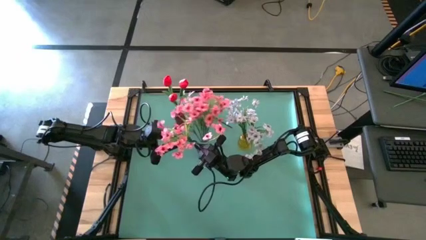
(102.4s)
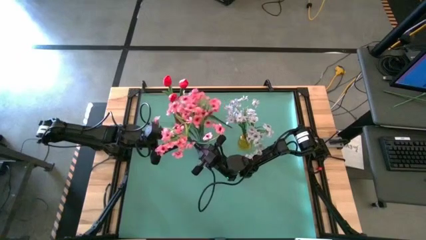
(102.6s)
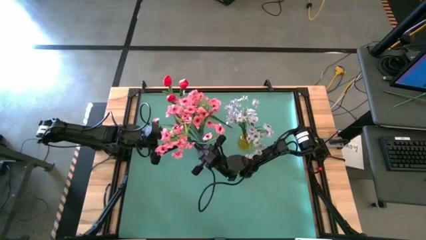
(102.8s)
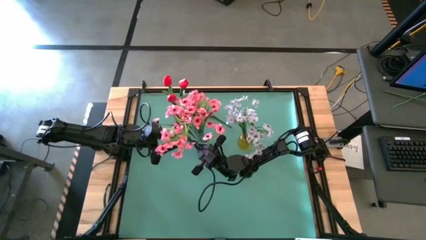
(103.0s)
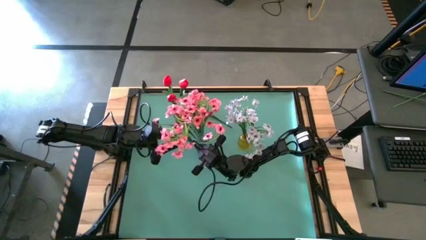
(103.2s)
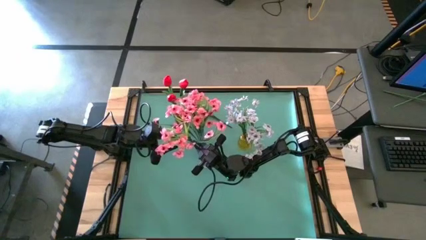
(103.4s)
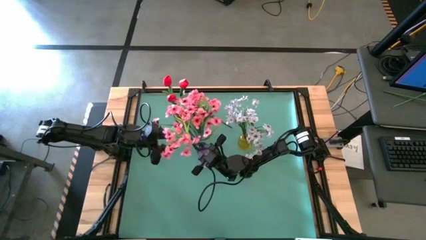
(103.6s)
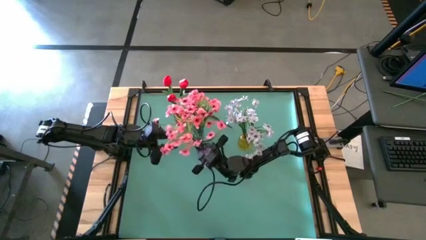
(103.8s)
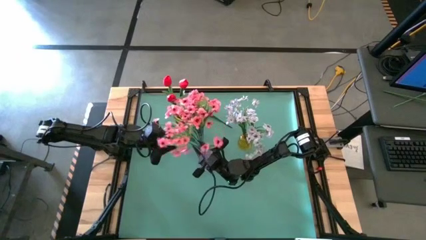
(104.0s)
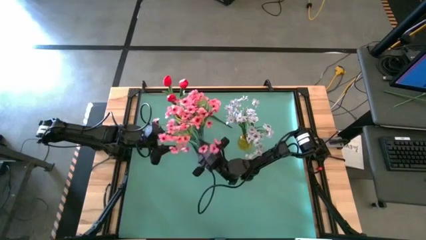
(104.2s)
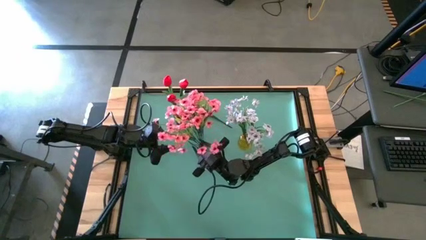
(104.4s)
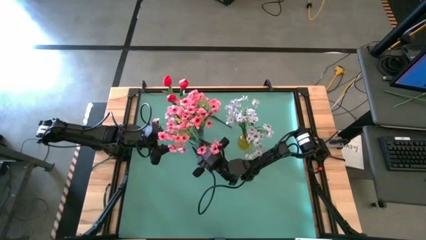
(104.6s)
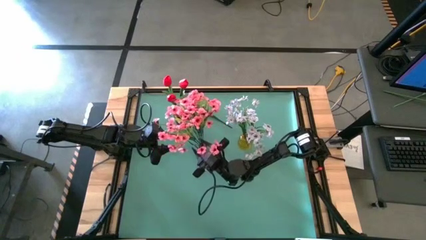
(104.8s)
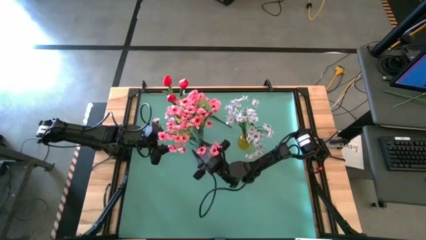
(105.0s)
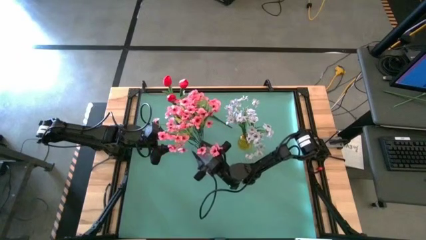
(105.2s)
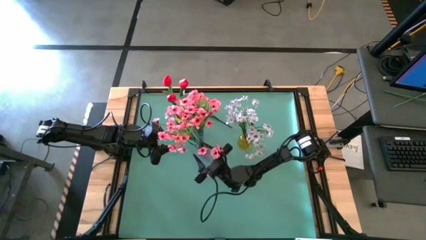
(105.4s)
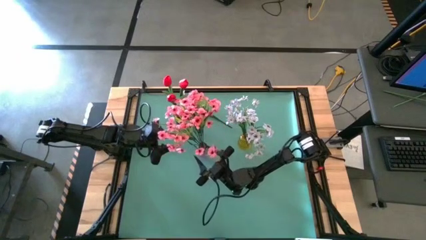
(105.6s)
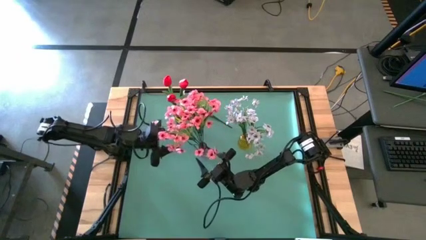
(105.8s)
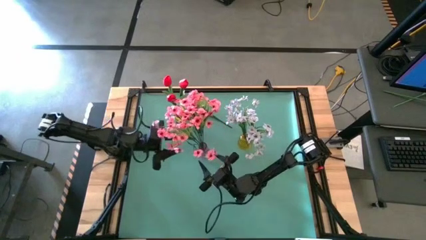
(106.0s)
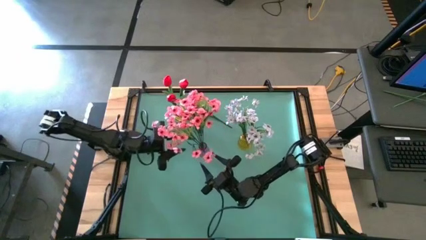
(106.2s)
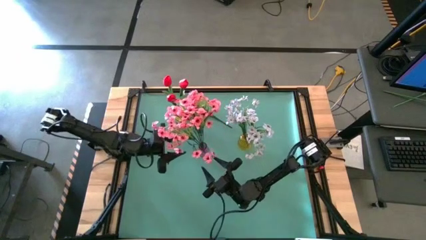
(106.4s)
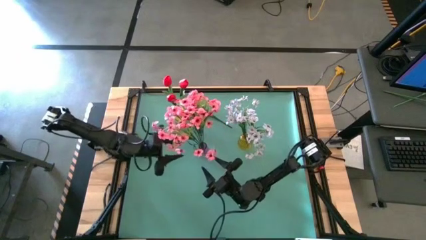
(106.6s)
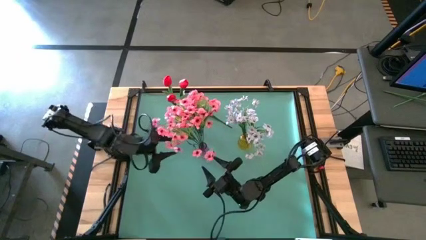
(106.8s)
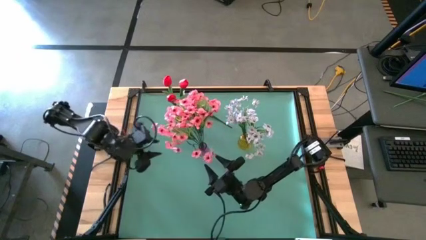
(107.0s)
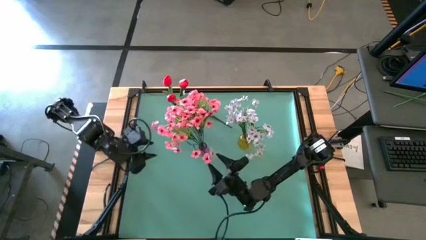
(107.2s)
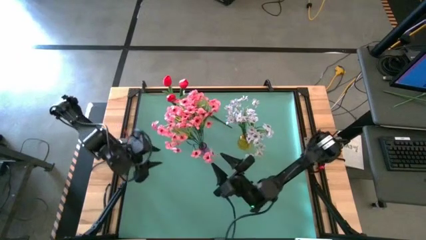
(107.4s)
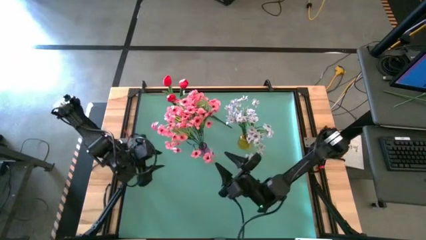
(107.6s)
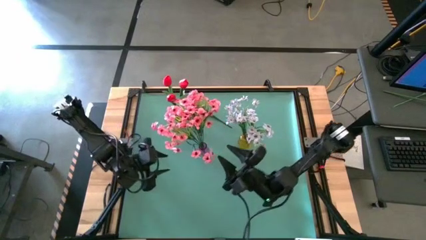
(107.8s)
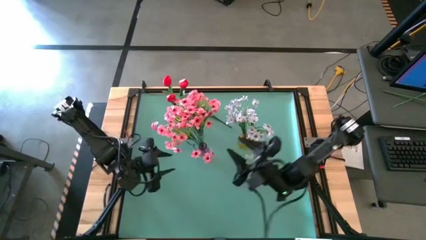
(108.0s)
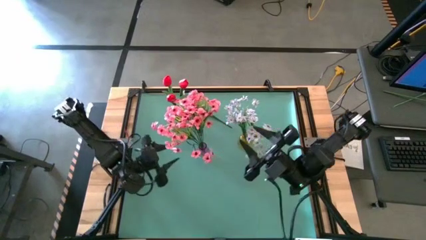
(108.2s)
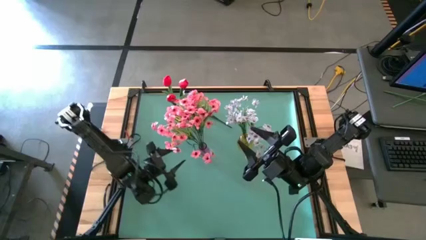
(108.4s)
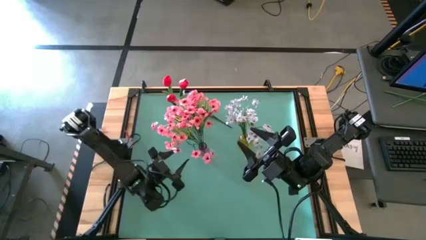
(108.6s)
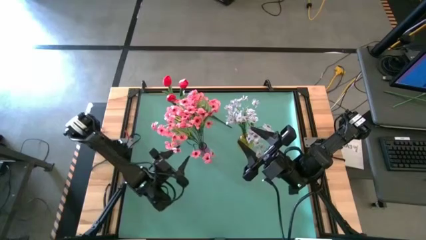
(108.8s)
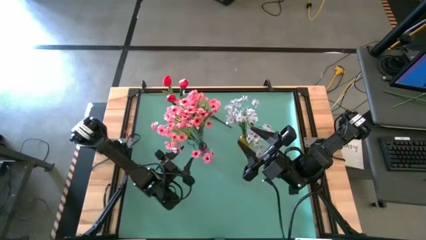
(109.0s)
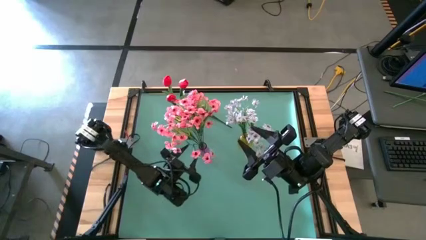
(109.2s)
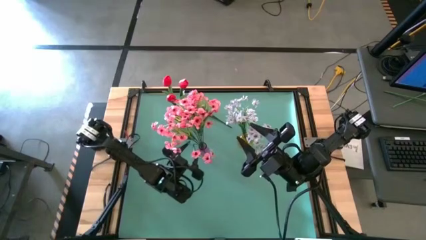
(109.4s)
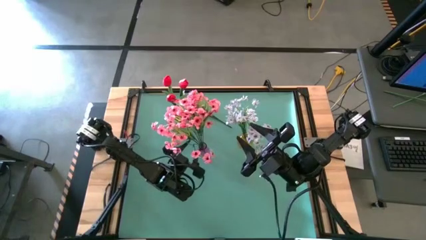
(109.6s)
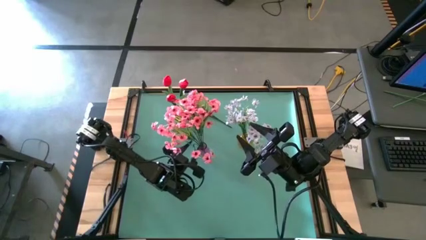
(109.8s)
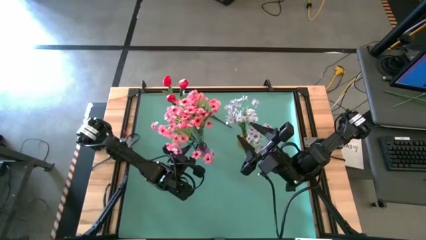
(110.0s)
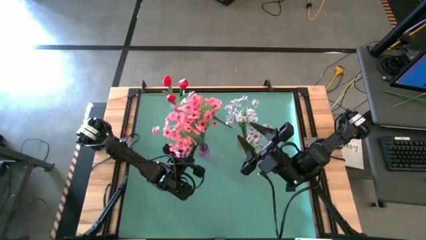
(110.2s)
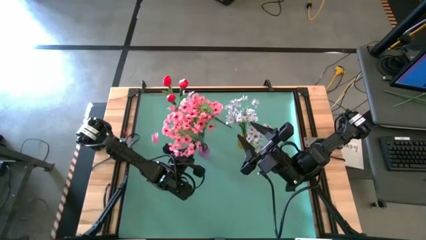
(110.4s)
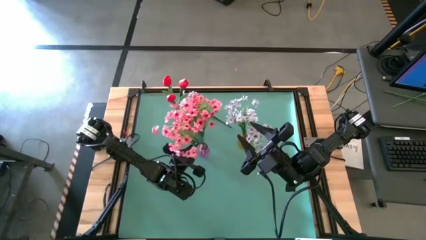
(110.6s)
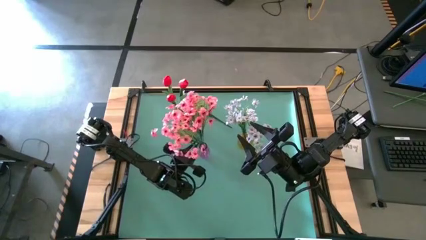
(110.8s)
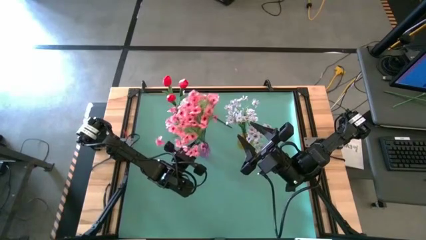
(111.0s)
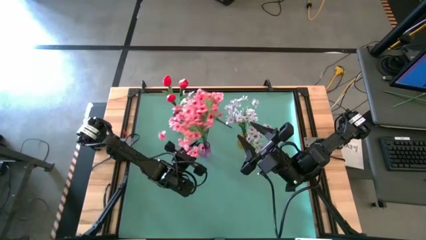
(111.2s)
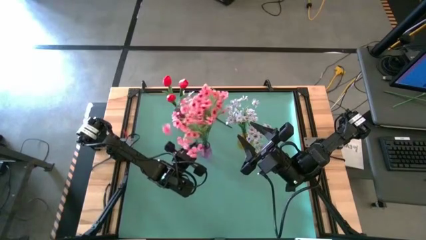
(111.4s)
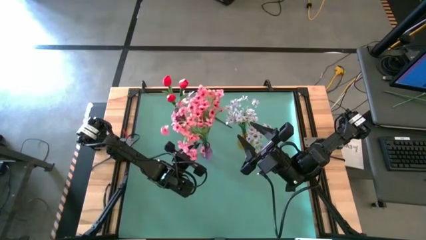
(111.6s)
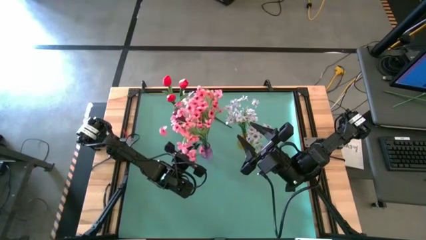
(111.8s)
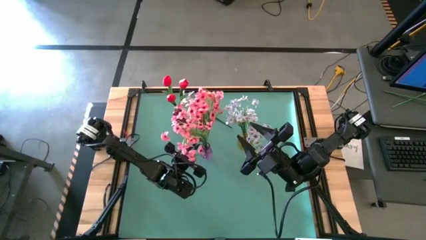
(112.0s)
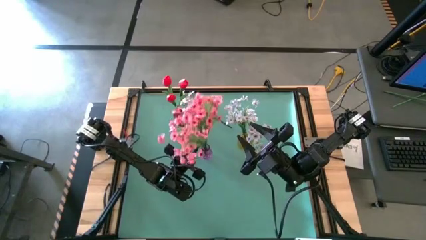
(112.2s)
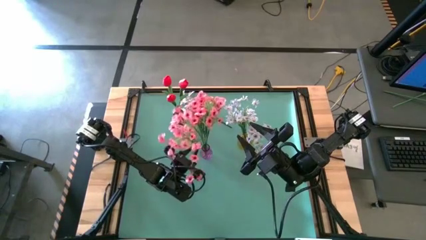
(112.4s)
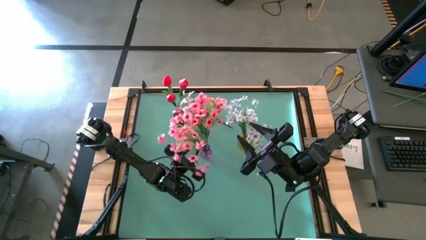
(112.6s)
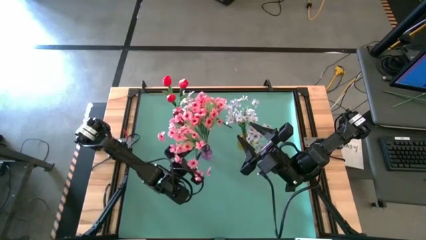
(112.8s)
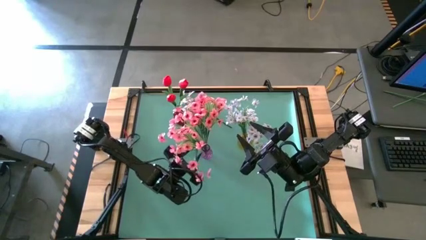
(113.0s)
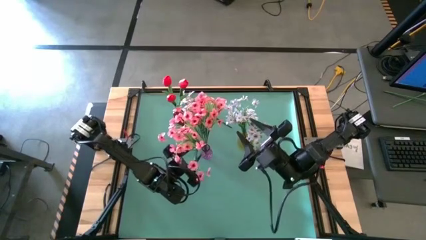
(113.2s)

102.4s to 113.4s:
Task: Sort flowers into vase by color
Put the pink flower into the purple vase
